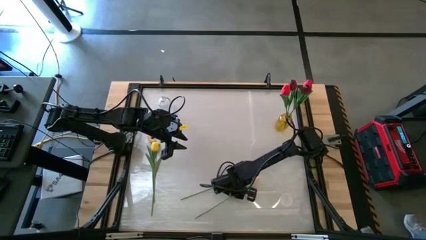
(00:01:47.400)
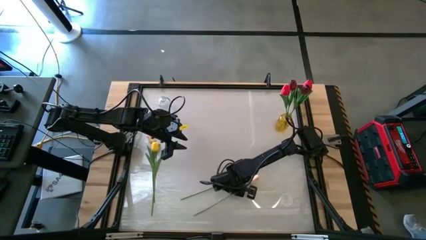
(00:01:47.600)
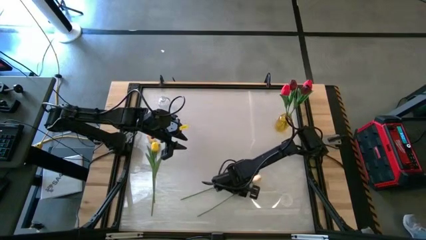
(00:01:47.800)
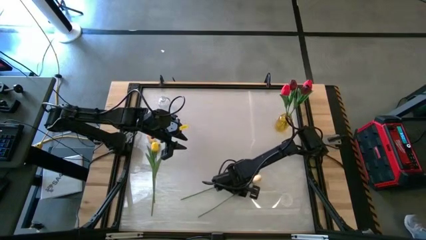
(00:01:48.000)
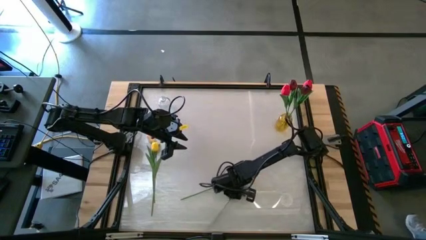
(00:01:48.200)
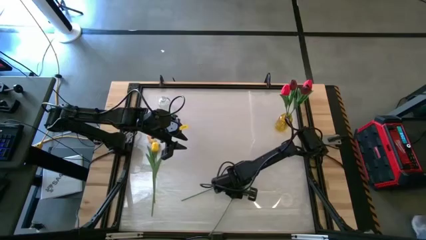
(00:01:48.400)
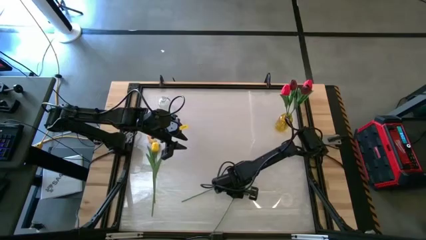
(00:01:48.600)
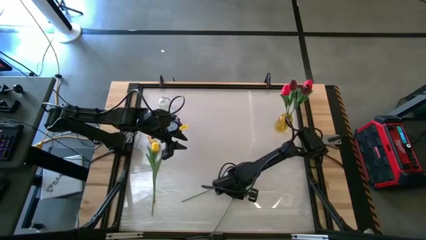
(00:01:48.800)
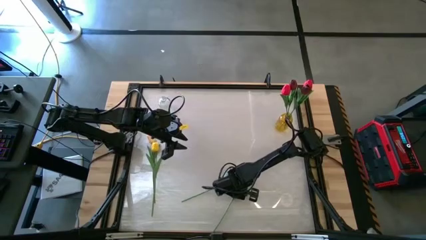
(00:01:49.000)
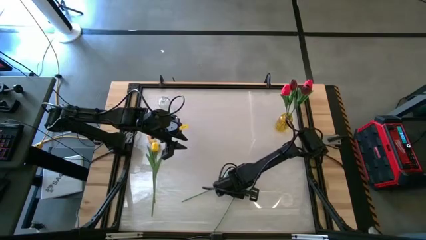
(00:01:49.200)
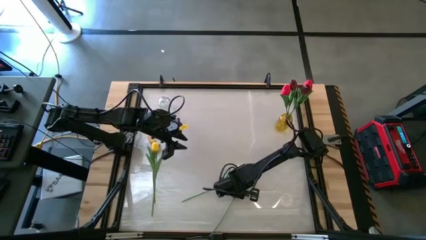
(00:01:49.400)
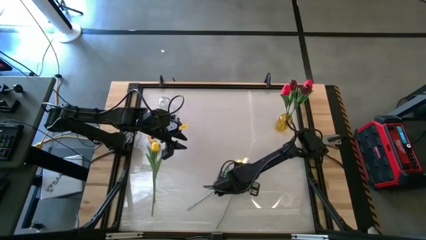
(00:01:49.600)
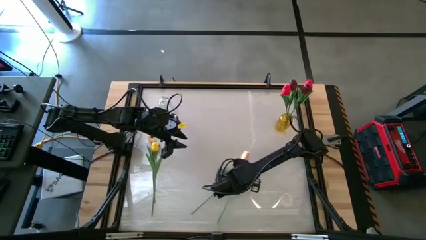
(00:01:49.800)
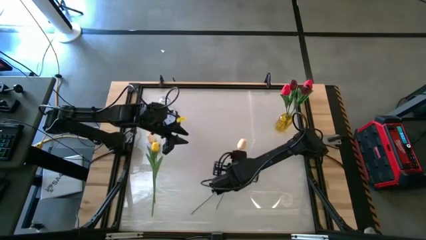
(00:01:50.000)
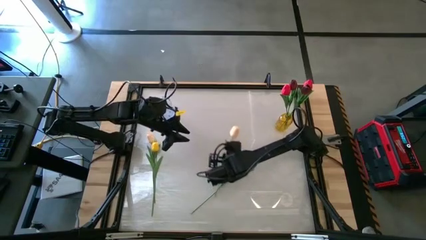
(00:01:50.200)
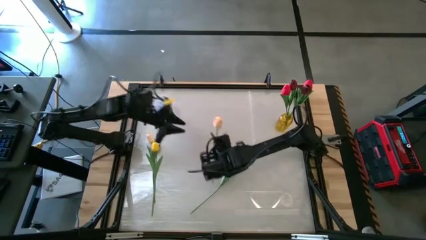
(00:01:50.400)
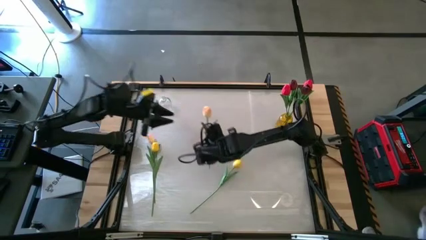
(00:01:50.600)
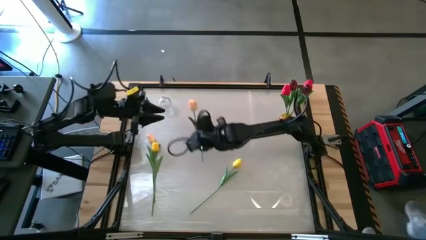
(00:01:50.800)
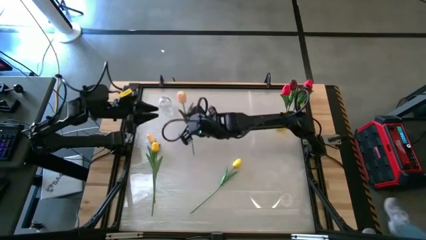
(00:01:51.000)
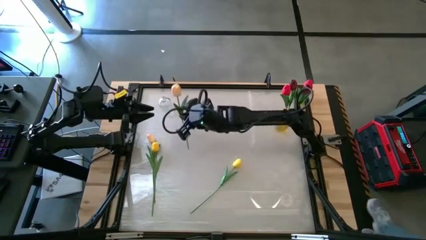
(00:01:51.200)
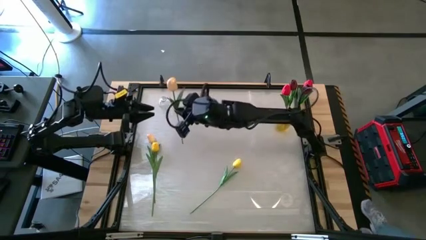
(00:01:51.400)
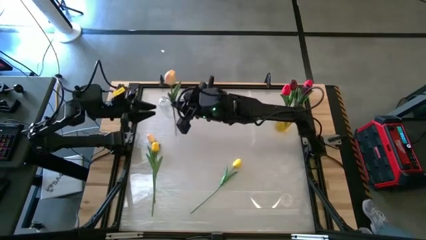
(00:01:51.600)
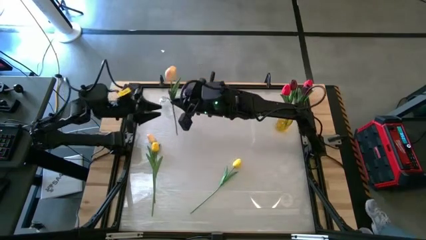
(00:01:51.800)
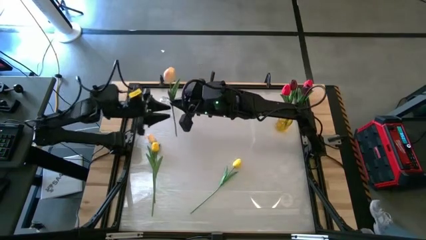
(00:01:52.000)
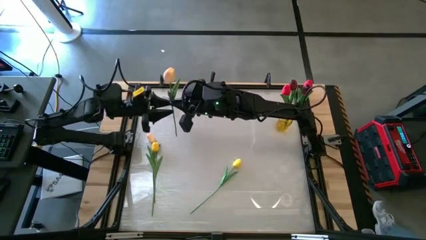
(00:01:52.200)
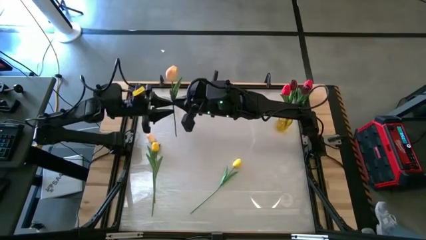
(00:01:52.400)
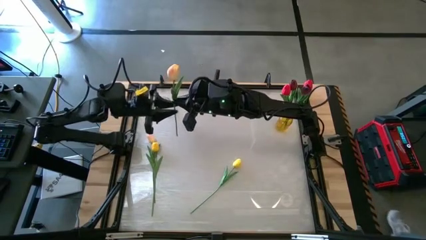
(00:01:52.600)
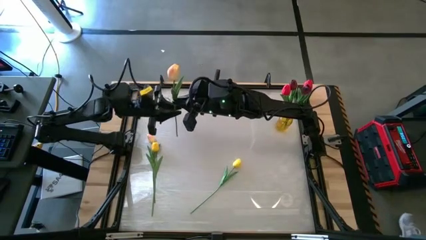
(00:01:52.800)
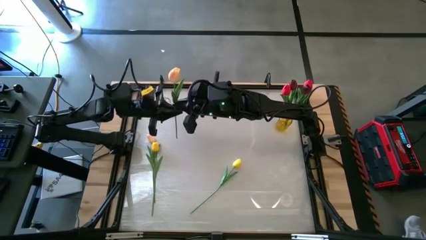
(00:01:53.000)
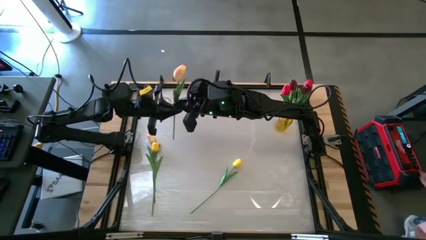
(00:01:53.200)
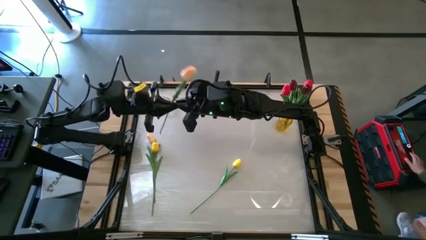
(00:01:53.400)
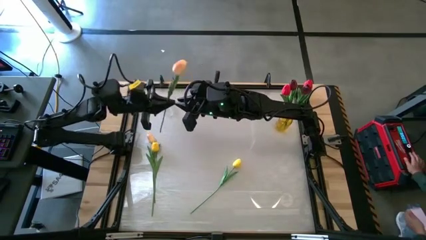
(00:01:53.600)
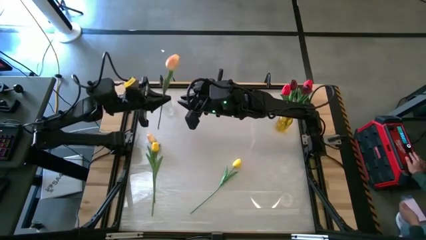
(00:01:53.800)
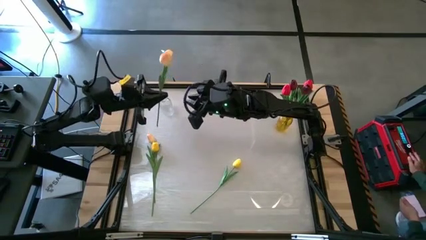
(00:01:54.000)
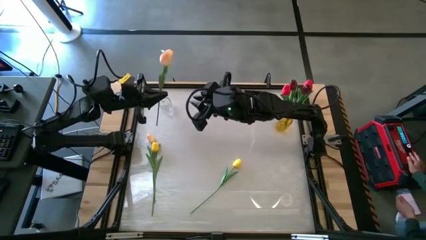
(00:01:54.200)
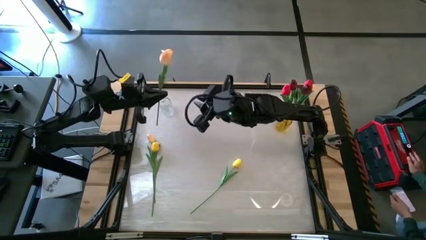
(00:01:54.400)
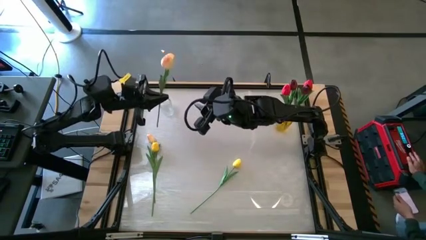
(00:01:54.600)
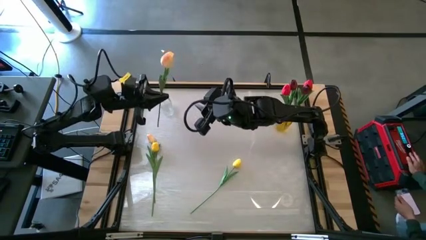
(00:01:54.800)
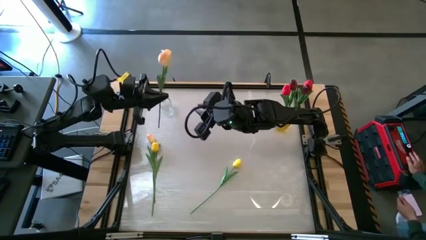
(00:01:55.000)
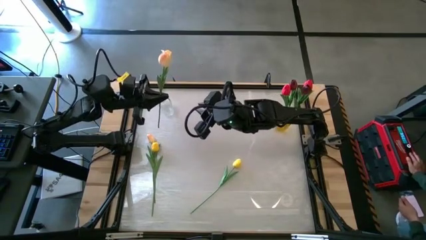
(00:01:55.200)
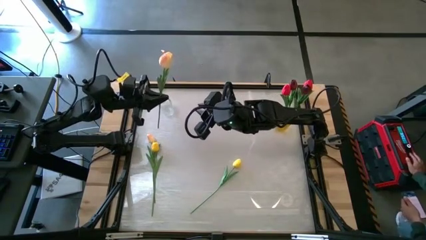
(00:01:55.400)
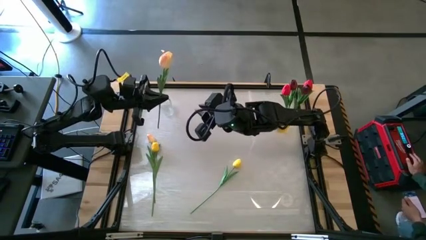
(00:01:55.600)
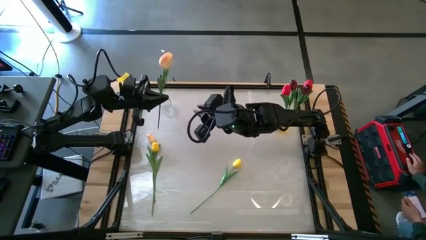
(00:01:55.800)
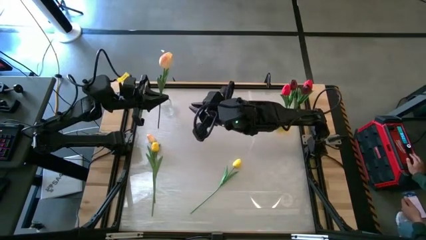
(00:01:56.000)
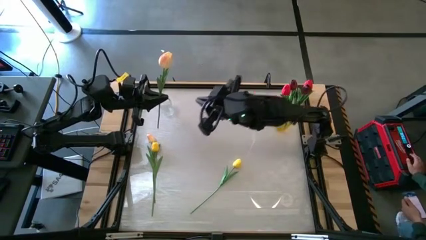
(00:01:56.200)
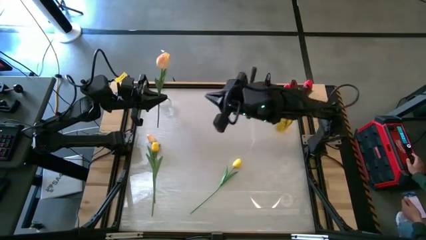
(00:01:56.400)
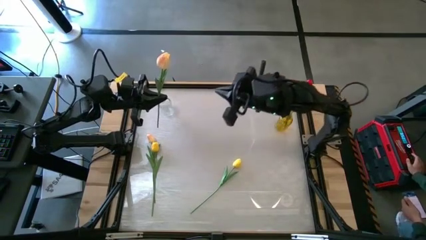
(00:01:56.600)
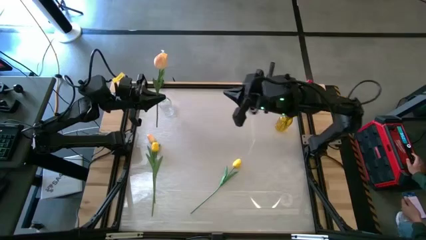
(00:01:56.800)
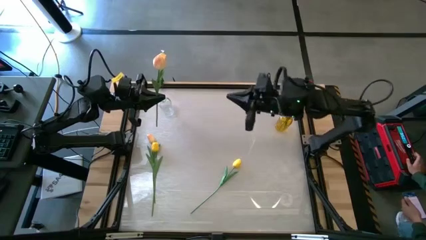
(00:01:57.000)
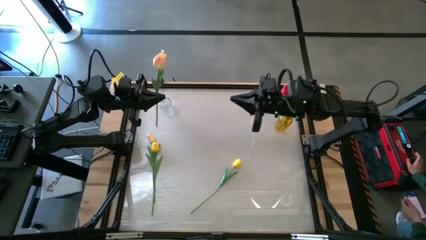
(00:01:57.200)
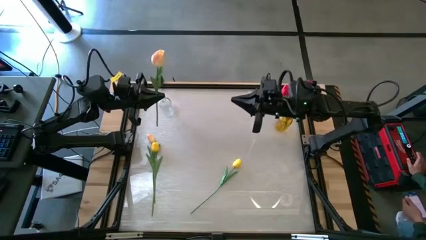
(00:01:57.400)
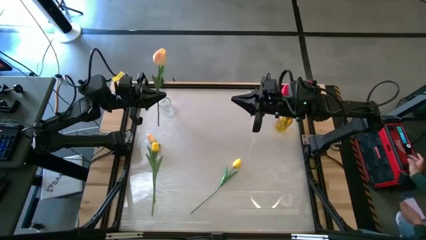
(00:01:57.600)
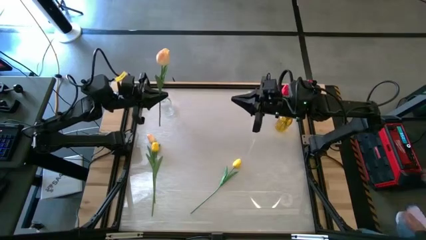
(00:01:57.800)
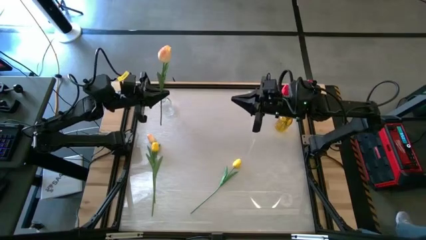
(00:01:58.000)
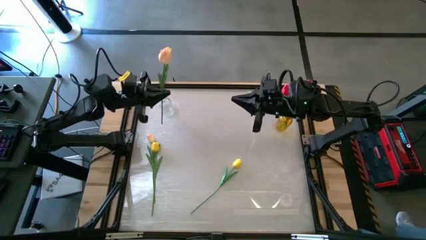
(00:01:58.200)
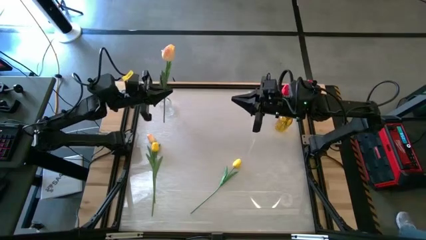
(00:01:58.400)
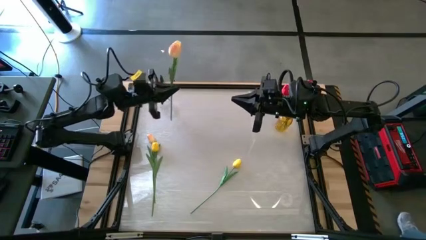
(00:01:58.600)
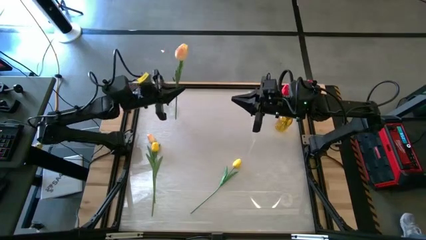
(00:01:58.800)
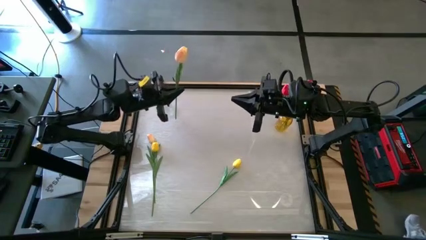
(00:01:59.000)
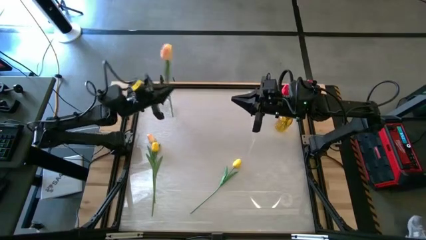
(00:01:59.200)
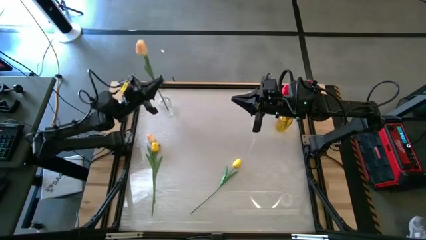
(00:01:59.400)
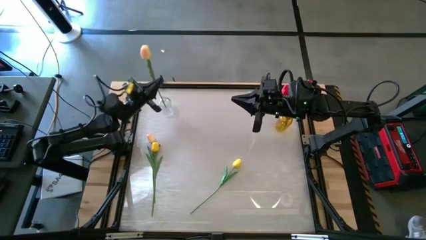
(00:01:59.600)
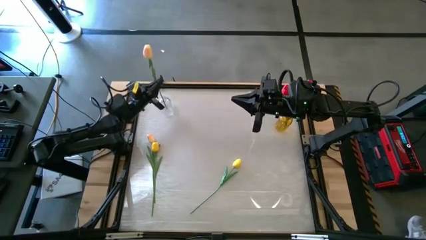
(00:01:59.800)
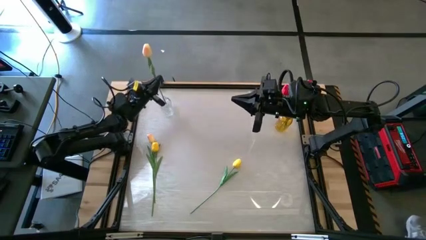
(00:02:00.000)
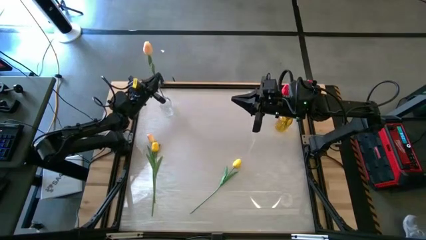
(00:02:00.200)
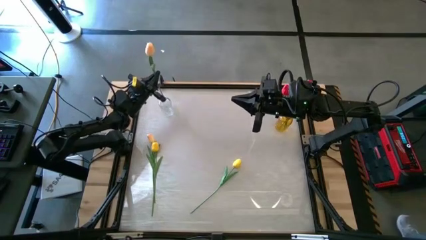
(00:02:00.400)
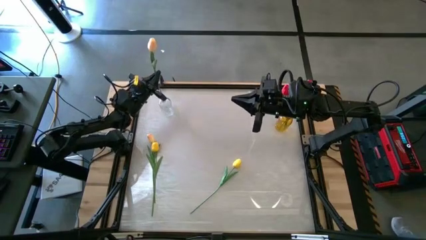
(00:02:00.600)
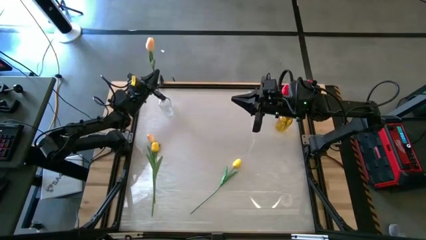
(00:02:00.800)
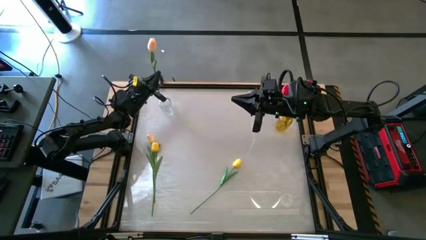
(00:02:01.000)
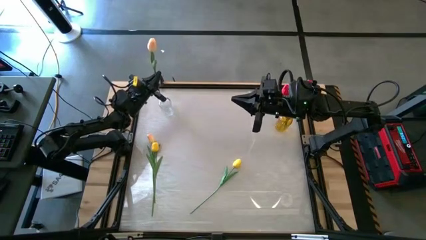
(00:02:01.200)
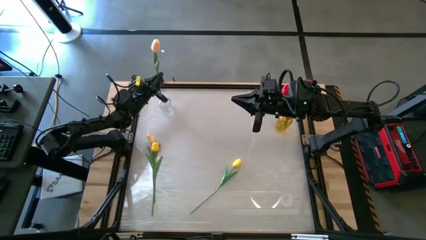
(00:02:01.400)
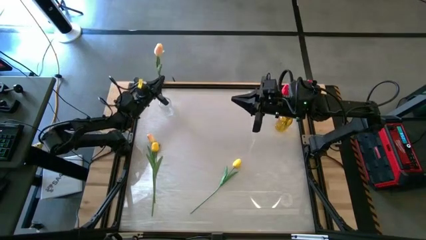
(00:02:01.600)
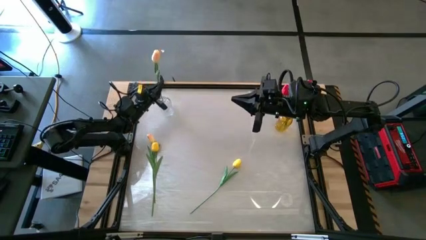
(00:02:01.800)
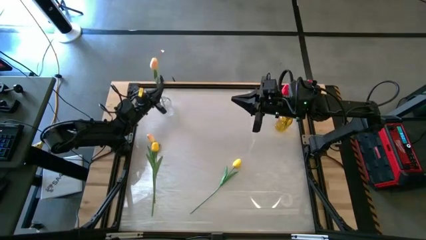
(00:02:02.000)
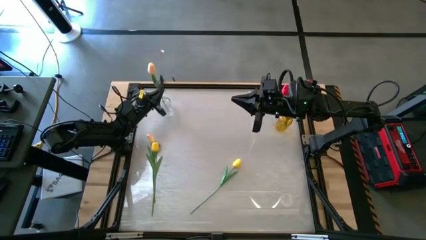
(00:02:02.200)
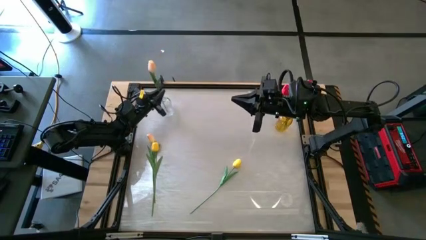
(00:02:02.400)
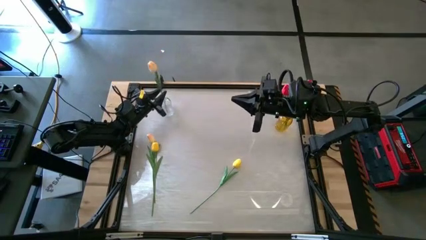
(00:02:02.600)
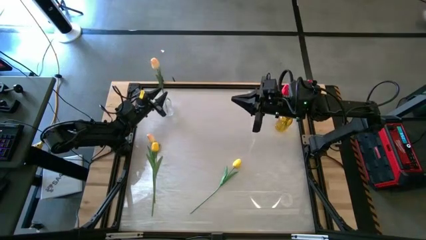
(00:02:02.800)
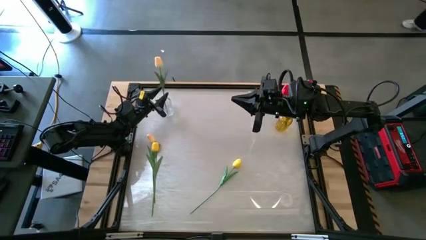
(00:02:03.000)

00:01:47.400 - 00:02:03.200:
Task: Sort flowers into vase by color
Put the bottom light pink tulip into the transparent vase

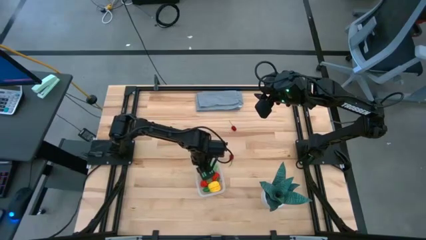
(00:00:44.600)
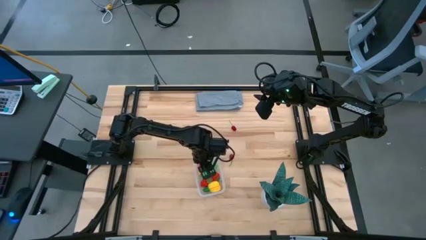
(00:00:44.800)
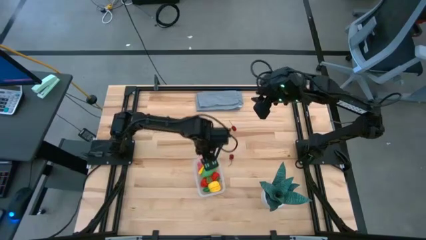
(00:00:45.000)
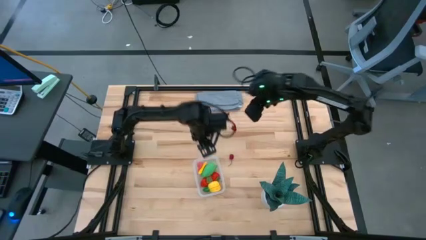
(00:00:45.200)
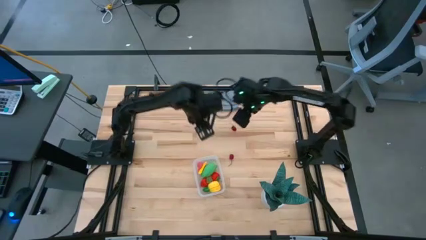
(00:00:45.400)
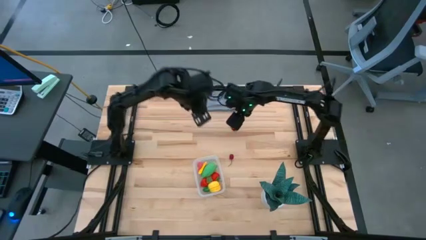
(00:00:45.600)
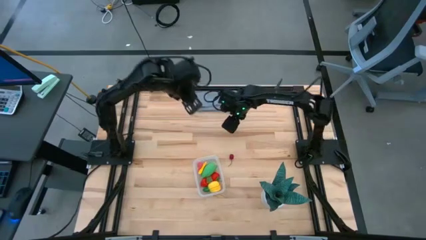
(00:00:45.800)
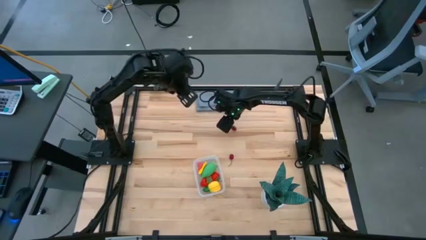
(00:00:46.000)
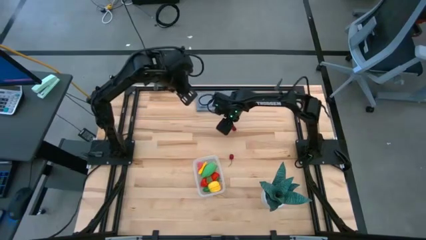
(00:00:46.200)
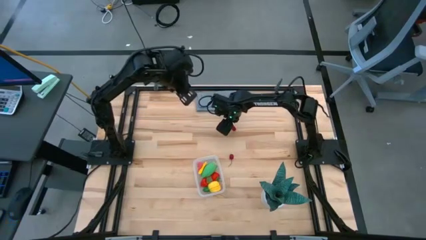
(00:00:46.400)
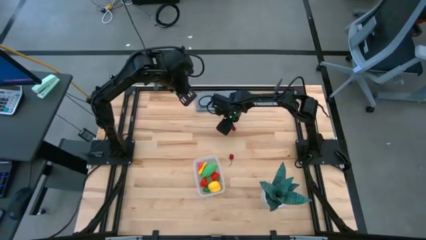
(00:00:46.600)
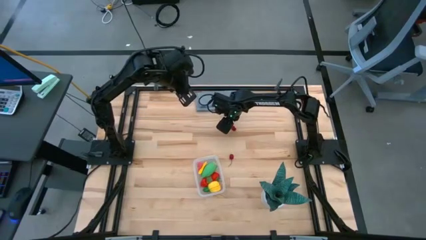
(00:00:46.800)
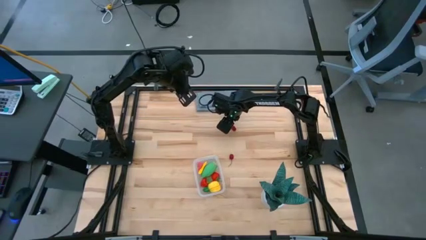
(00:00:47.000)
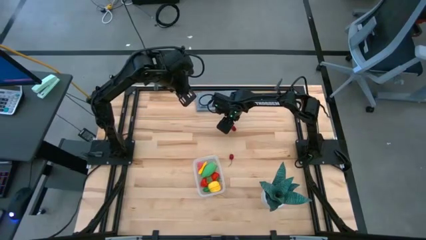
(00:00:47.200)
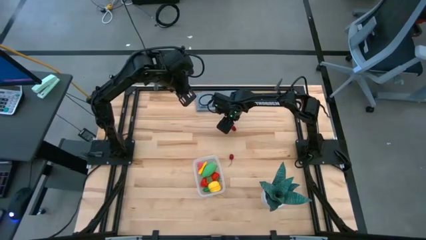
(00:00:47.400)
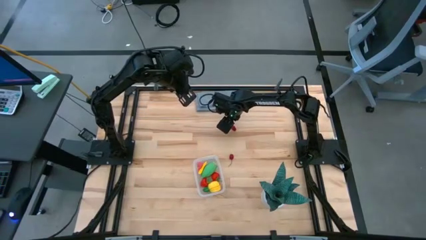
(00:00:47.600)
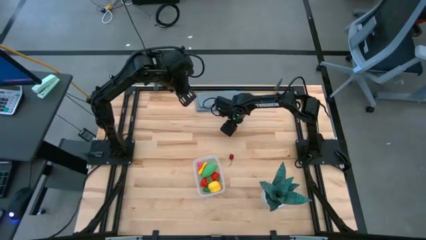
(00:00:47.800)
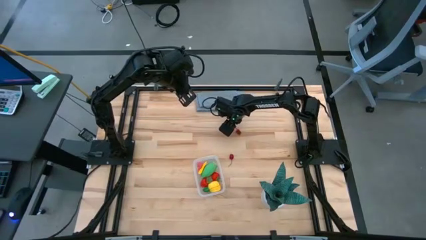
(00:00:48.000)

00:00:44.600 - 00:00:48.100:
Task: Pick and placing Produce into tupperware
Put the top cherry into the transparent bin
